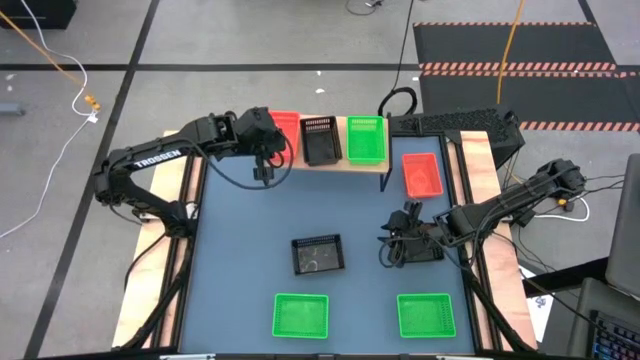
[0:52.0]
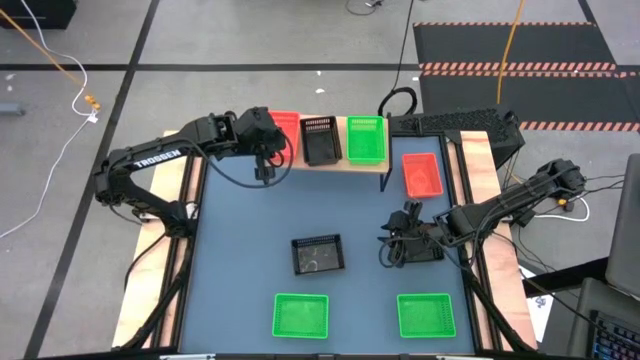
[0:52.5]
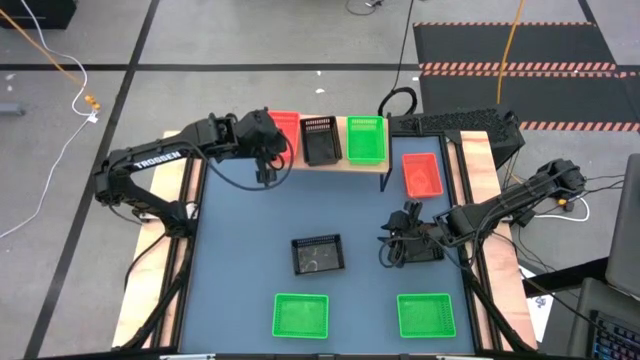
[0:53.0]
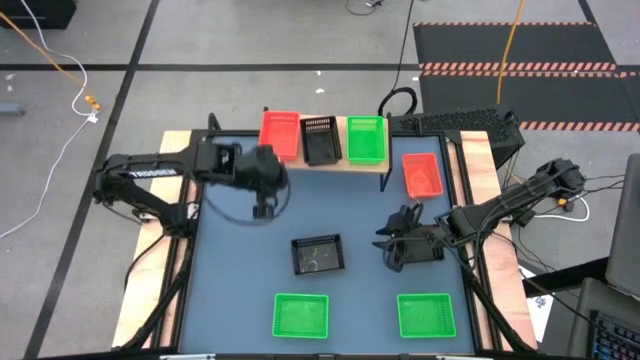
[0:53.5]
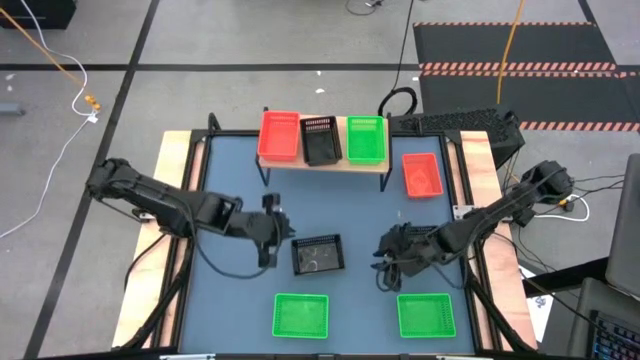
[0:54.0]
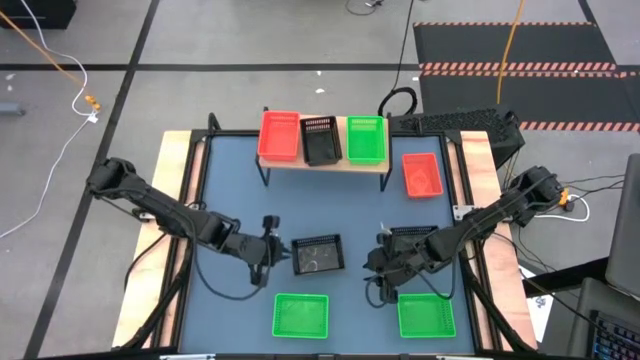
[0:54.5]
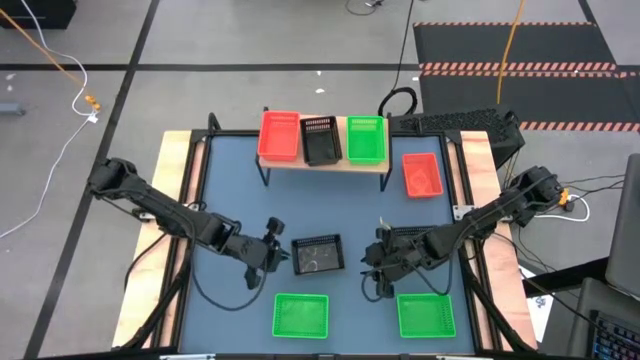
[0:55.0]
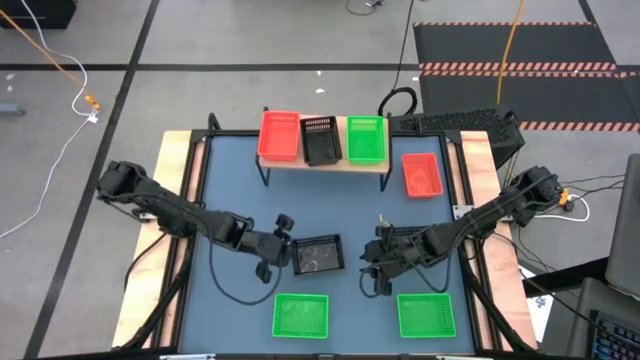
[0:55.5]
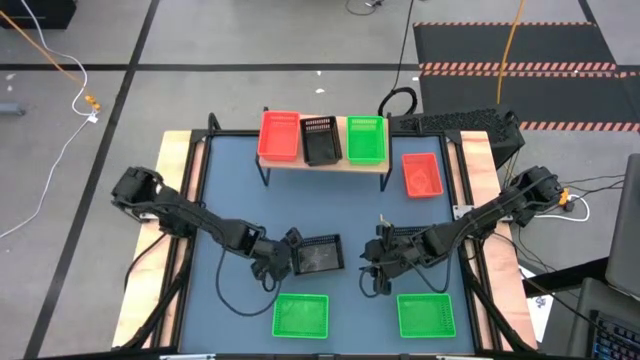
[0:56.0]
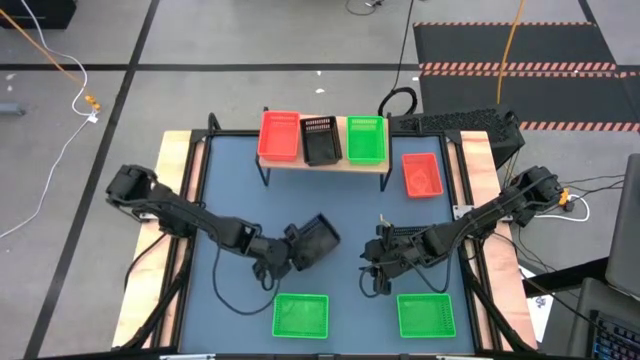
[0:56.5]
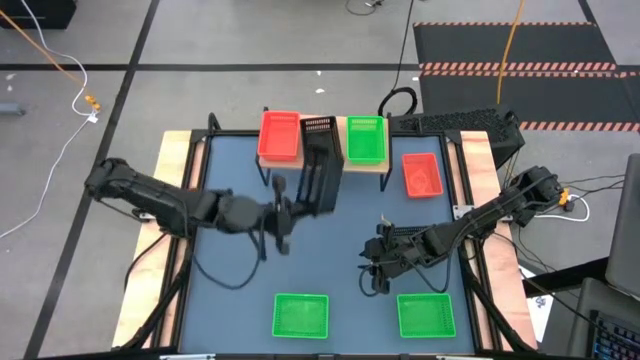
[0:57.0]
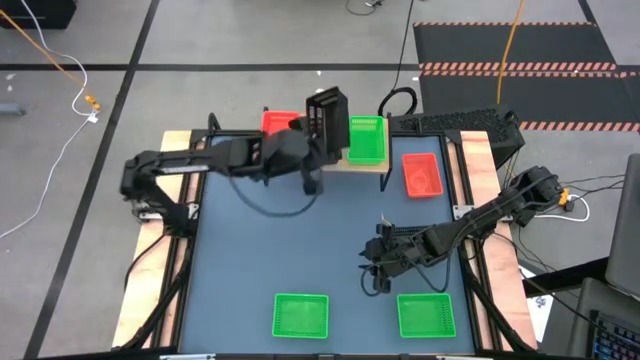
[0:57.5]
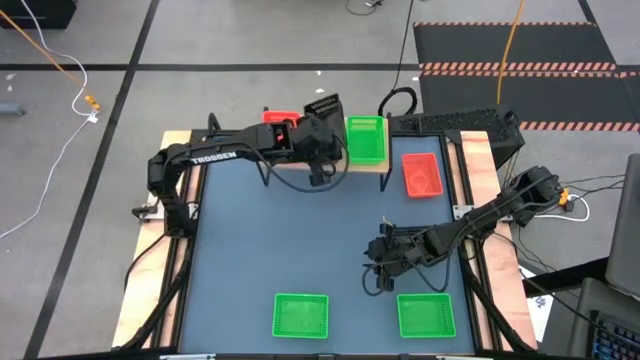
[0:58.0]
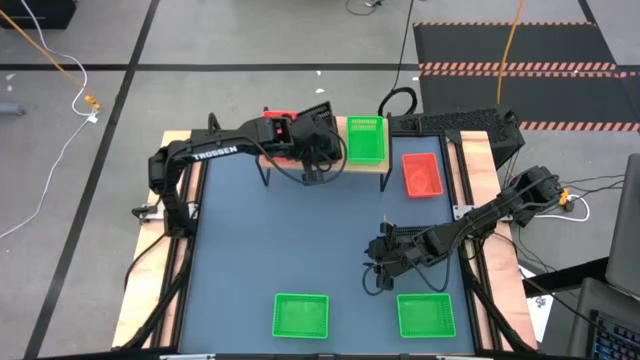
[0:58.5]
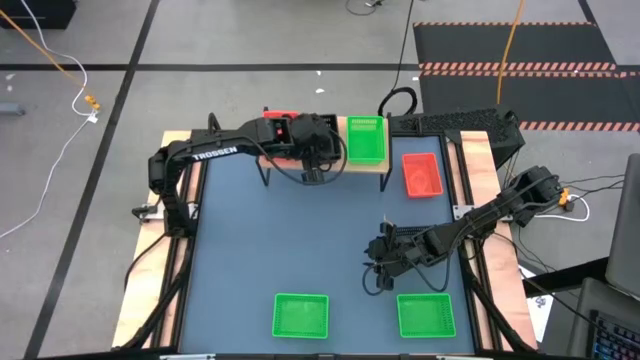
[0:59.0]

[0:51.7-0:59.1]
Task: Stack baskets on shelf by color
Stack the left black bin on the other black bin on the shelf

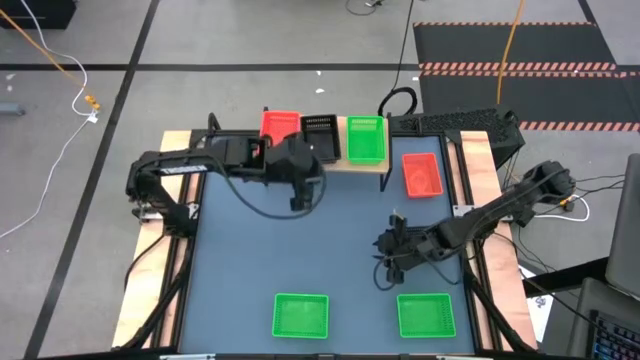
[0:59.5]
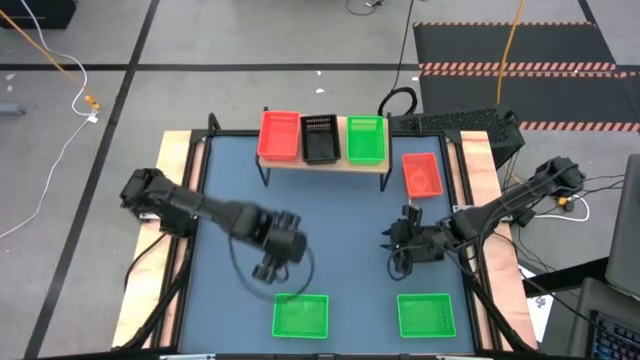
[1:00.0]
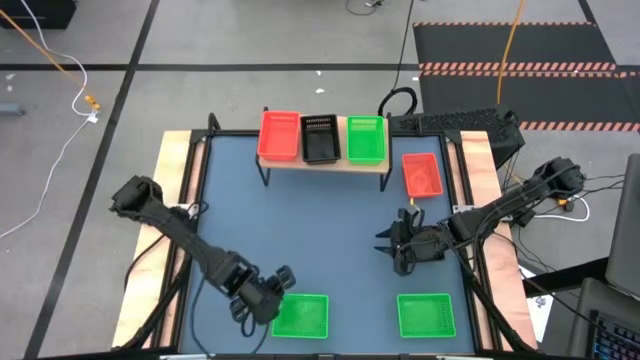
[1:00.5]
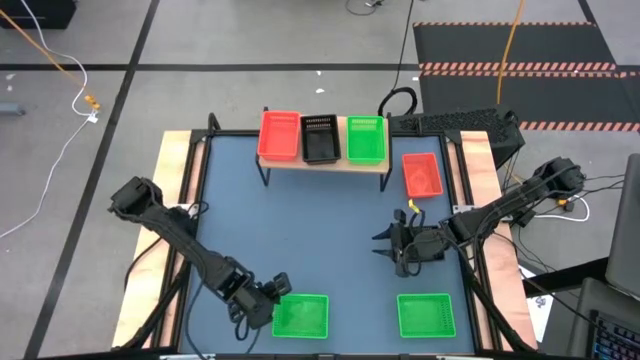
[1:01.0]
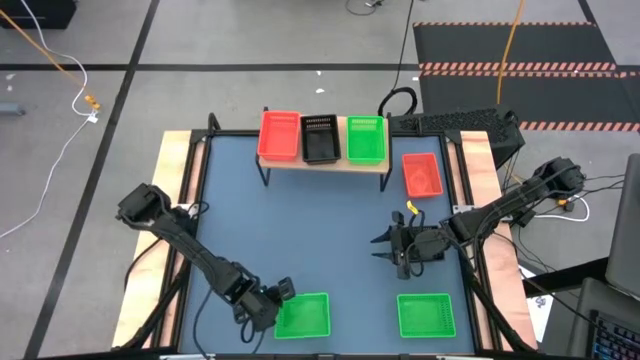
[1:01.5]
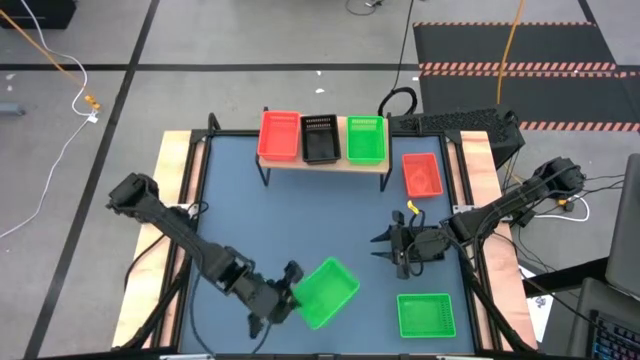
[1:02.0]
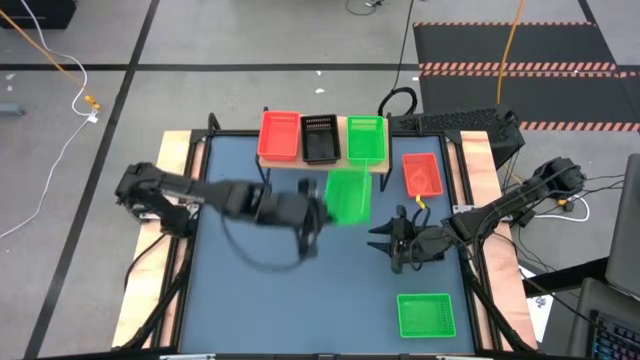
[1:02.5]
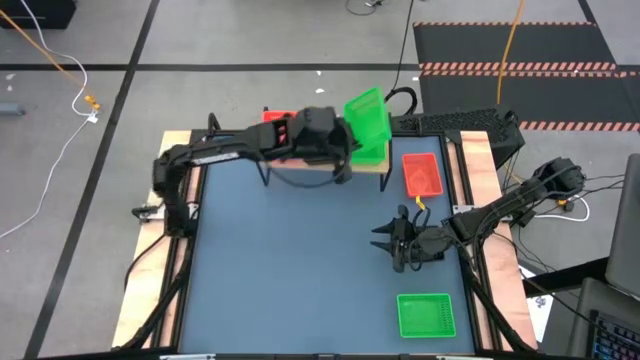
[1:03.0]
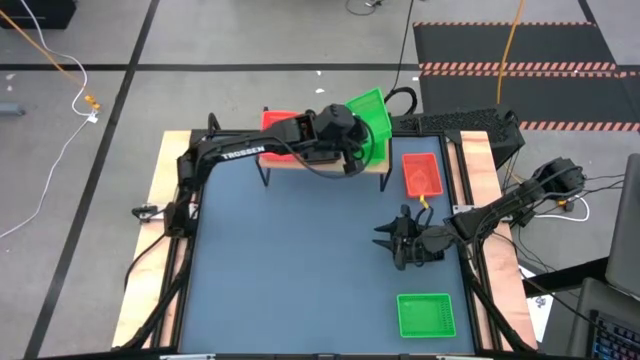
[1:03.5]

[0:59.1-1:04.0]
Stack the left green bin on the other green bin on the shelf

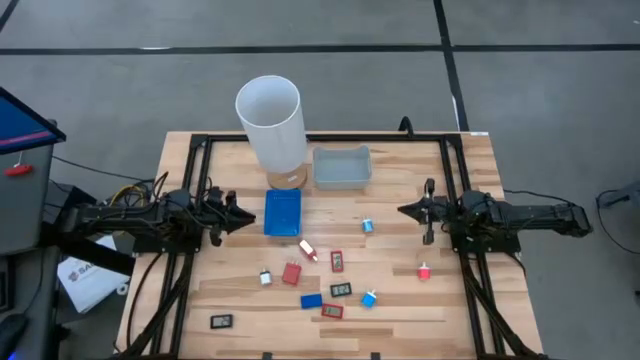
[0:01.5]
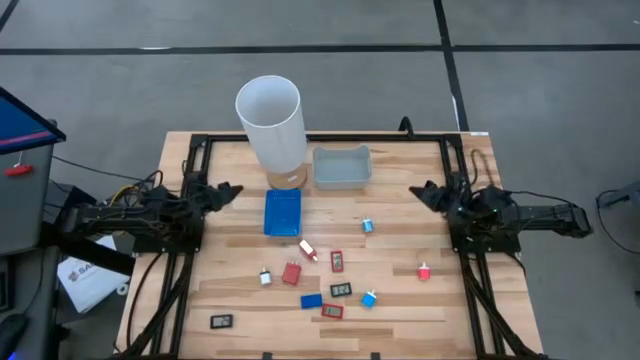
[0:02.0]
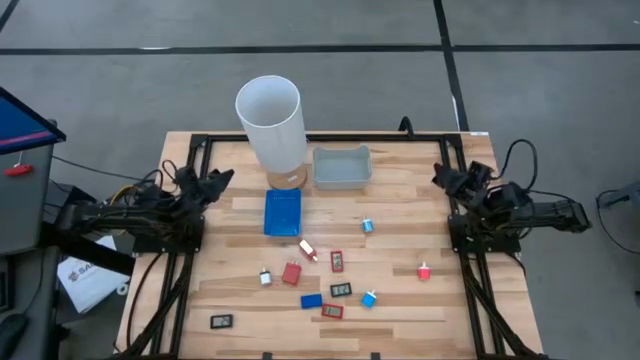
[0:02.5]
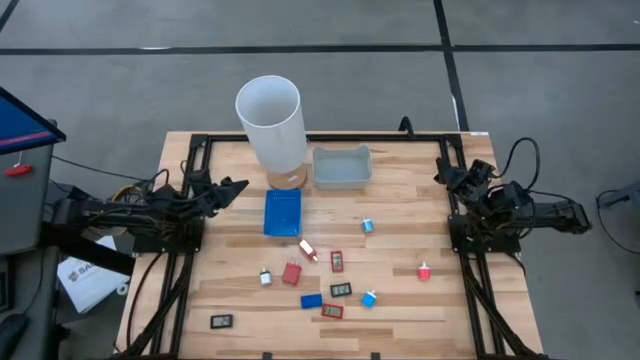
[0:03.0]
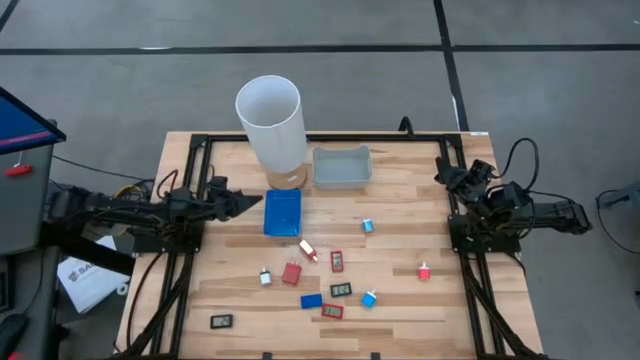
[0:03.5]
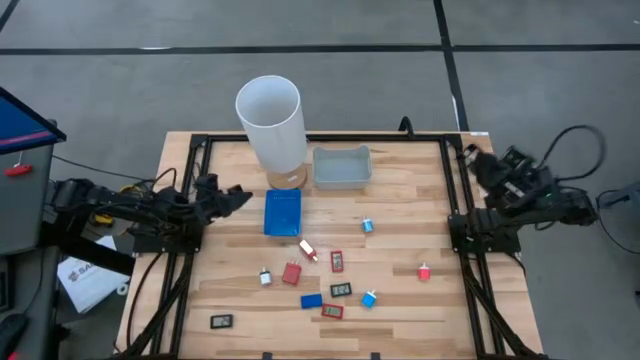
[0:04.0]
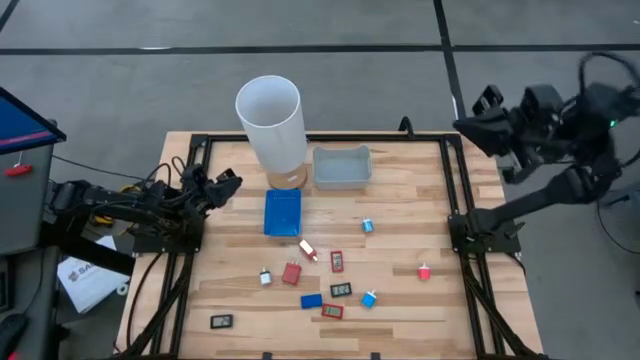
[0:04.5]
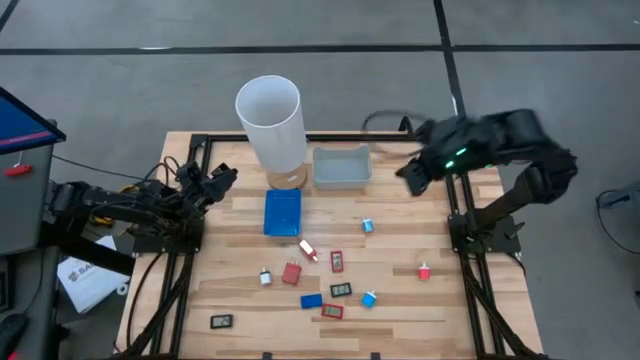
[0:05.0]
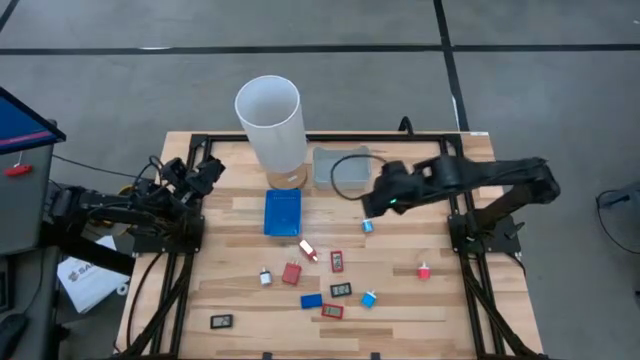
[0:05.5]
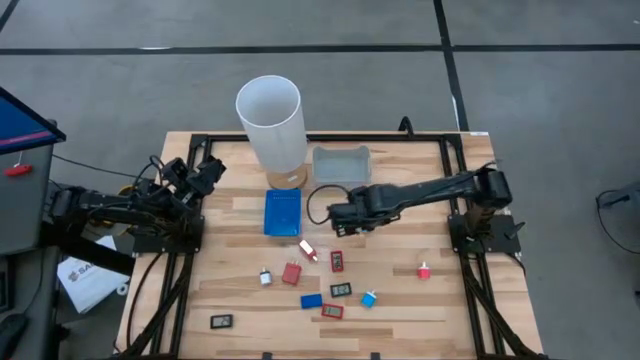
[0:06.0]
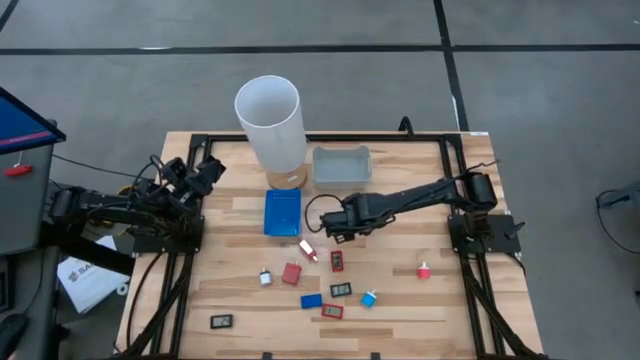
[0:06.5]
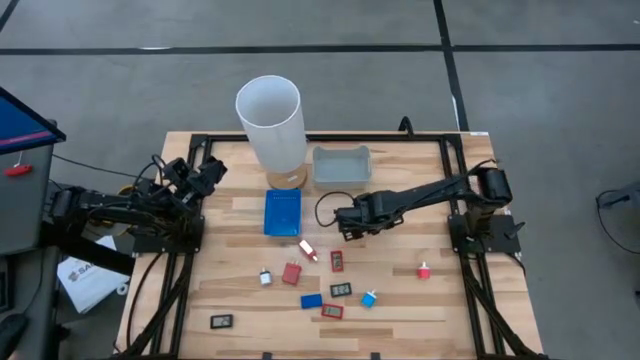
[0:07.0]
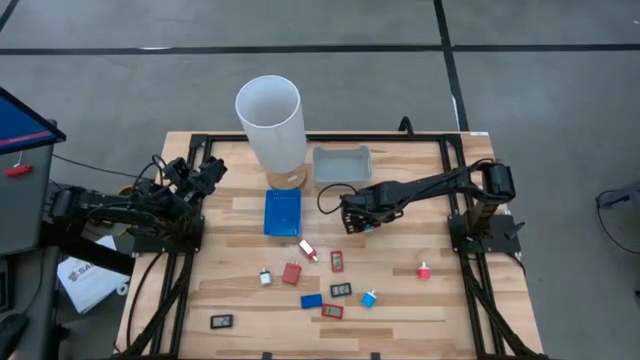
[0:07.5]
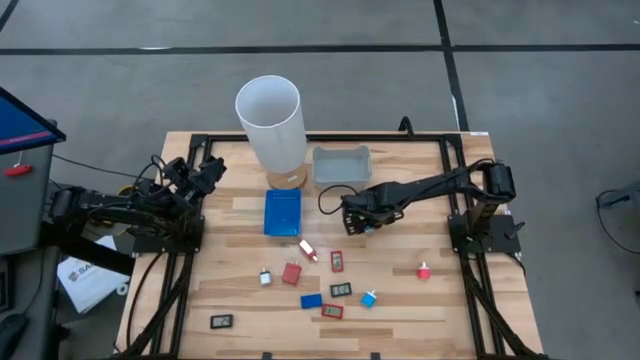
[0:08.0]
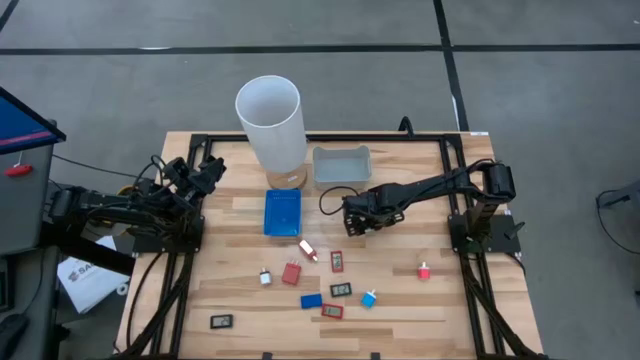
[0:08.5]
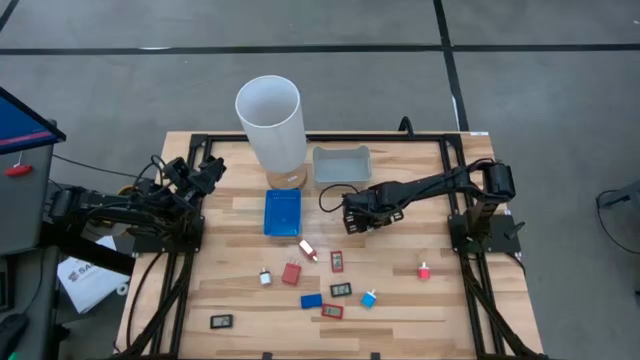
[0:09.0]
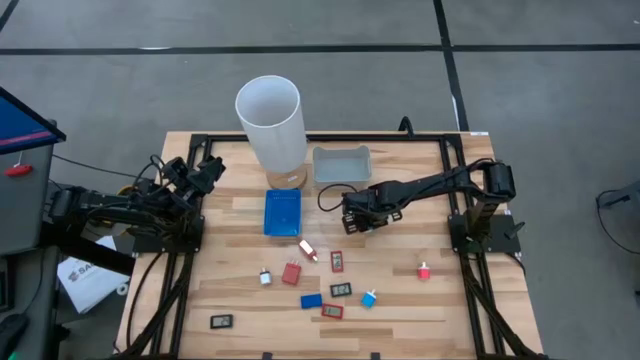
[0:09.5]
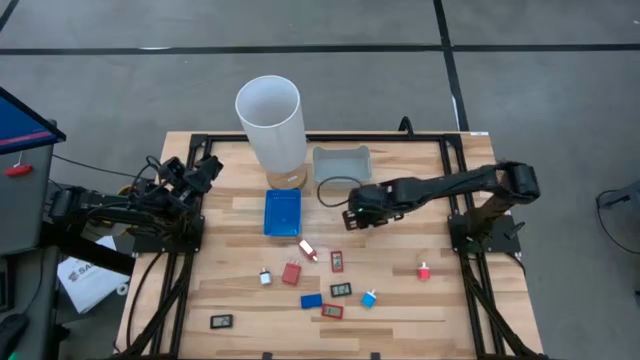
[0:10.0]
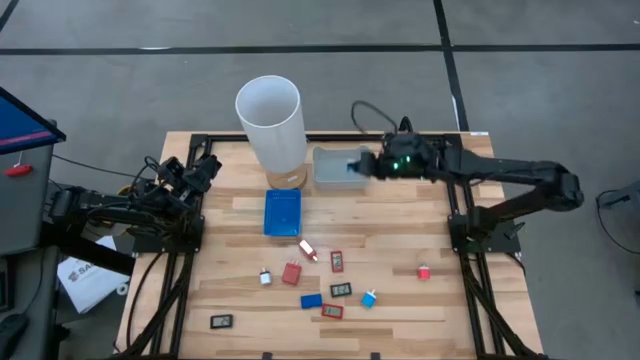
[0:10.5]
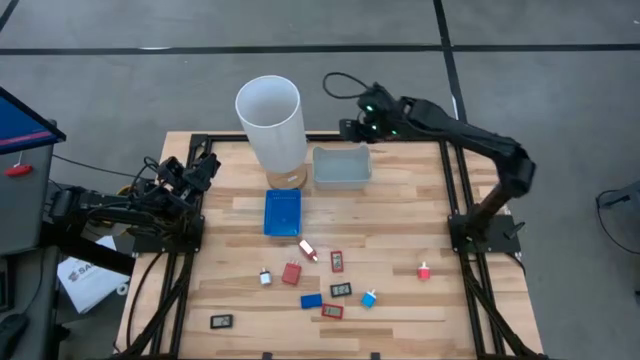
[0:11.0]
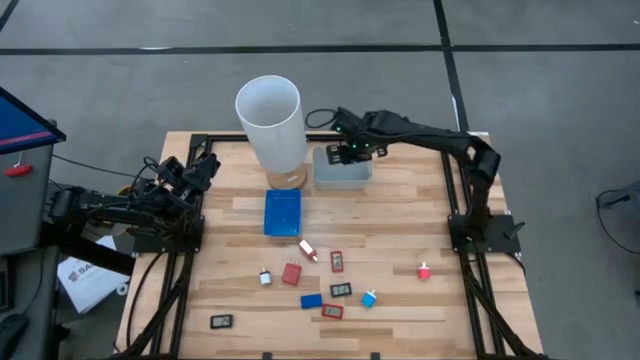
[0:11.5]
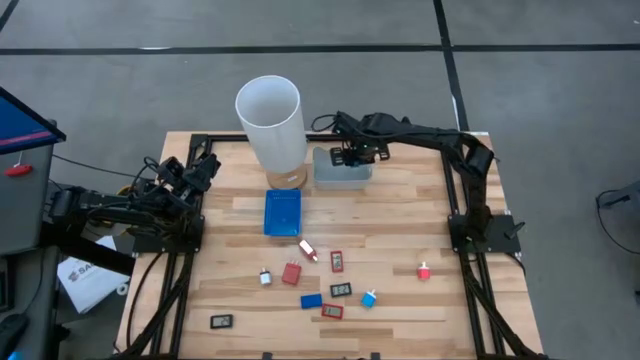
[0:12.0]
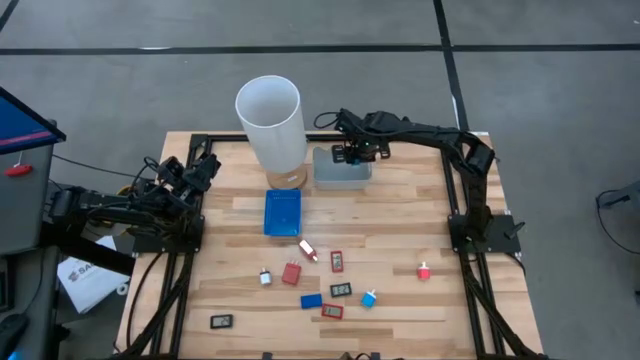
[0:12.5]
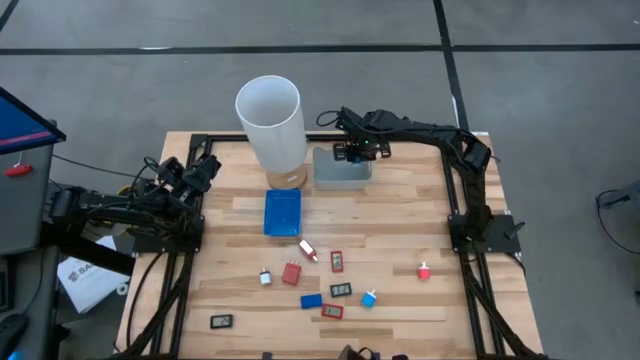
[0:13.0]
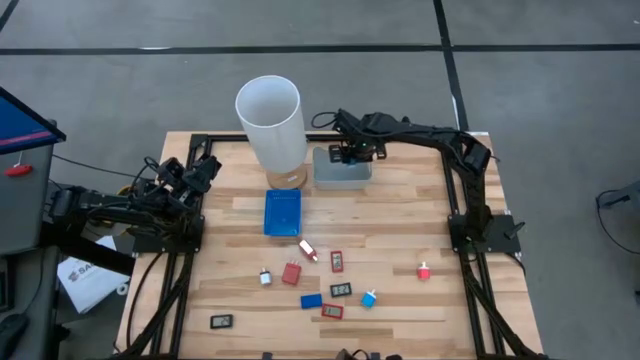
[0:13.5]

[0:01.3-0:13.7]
Task: Pick & Place Office items
Put the top blue charger adapter into the gray bin
